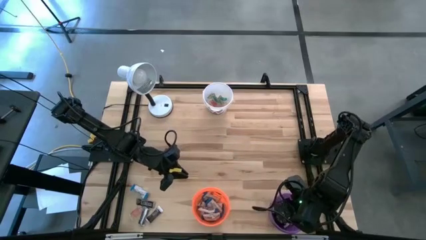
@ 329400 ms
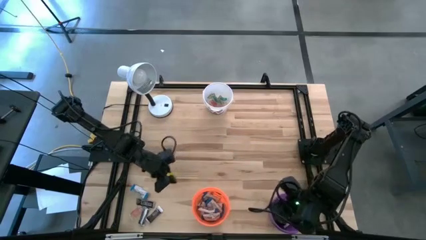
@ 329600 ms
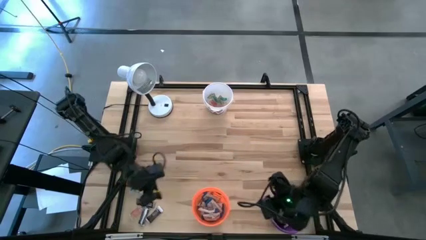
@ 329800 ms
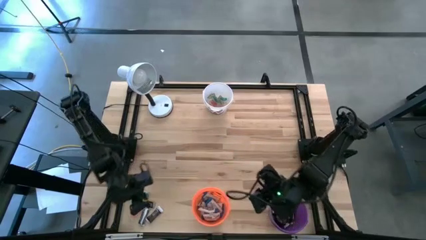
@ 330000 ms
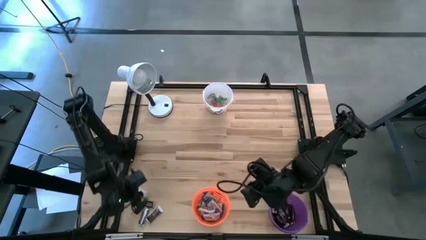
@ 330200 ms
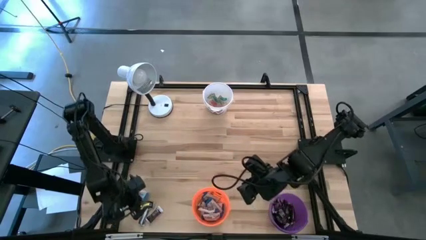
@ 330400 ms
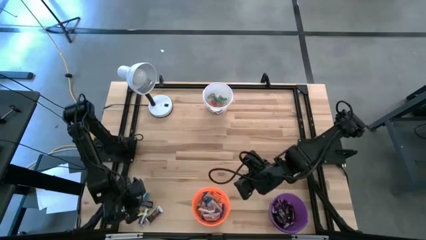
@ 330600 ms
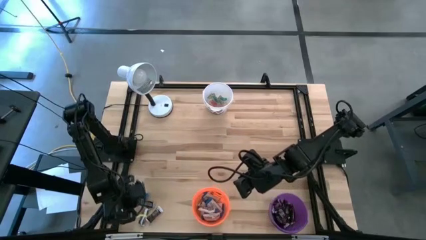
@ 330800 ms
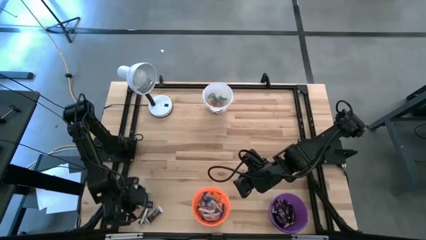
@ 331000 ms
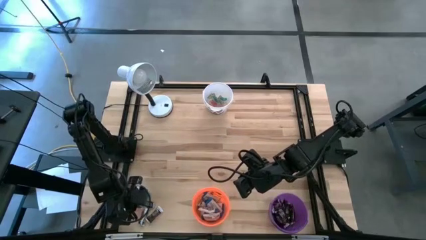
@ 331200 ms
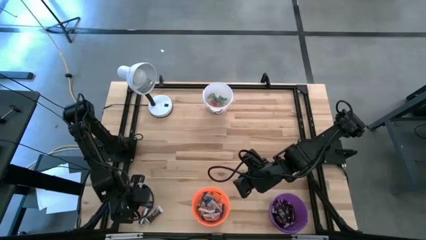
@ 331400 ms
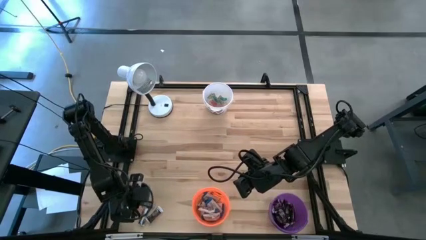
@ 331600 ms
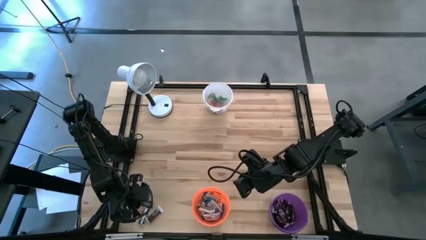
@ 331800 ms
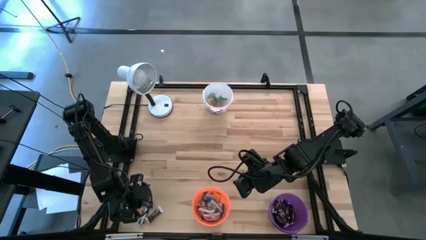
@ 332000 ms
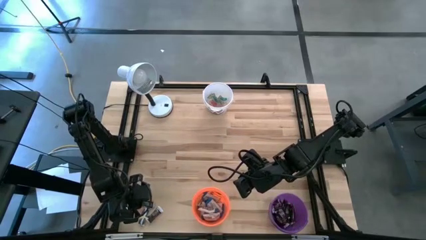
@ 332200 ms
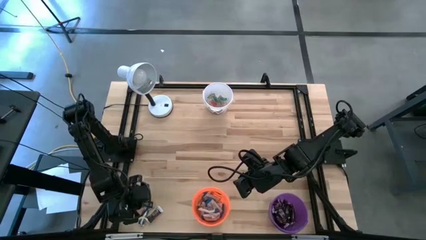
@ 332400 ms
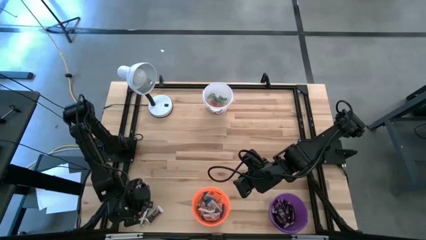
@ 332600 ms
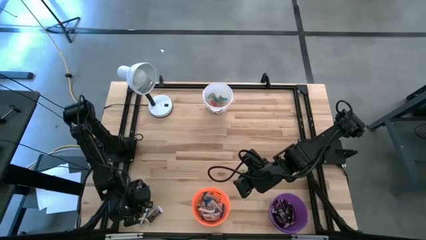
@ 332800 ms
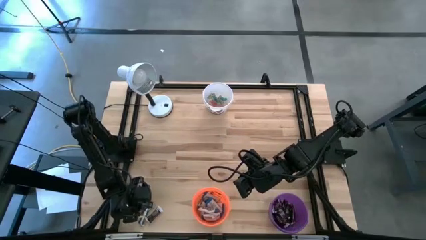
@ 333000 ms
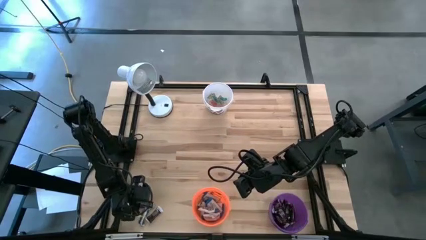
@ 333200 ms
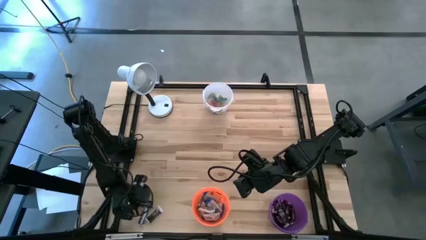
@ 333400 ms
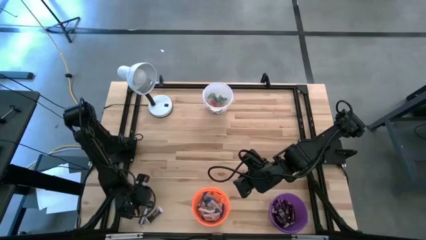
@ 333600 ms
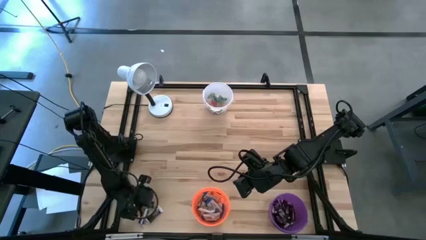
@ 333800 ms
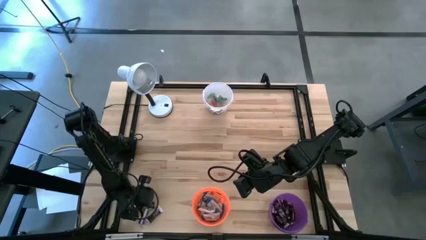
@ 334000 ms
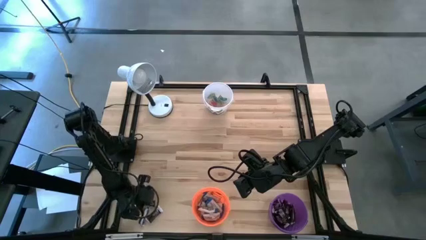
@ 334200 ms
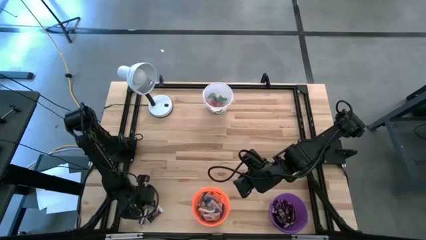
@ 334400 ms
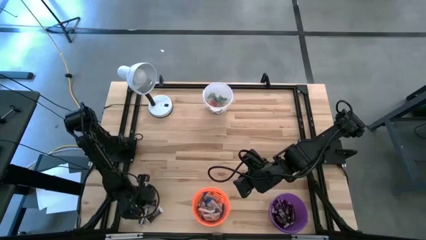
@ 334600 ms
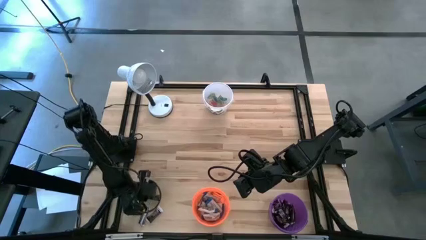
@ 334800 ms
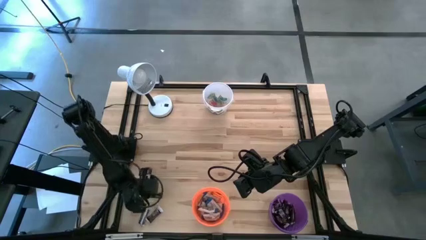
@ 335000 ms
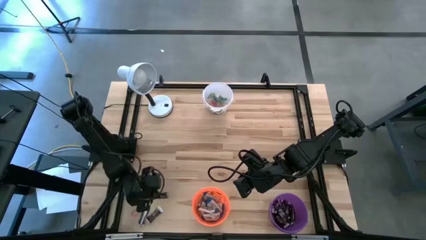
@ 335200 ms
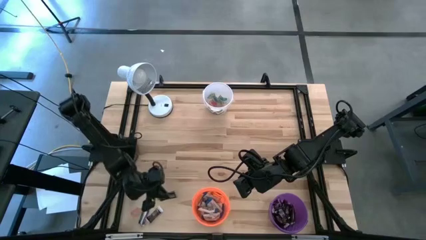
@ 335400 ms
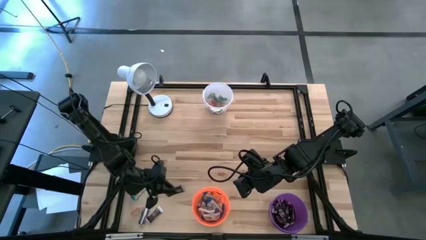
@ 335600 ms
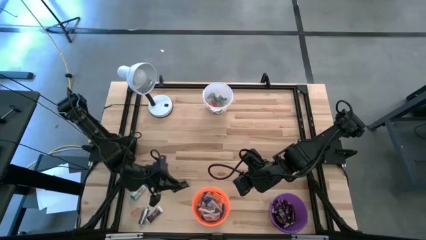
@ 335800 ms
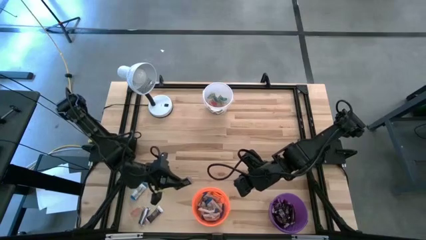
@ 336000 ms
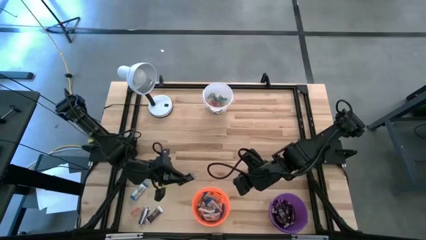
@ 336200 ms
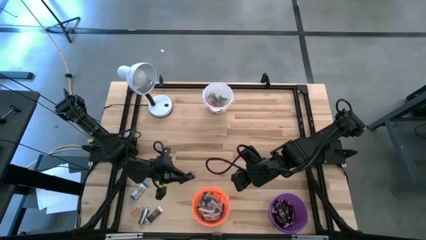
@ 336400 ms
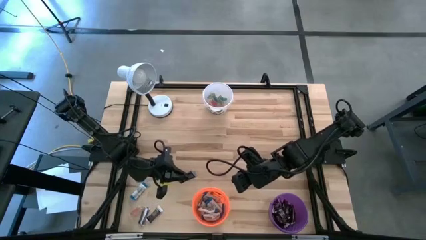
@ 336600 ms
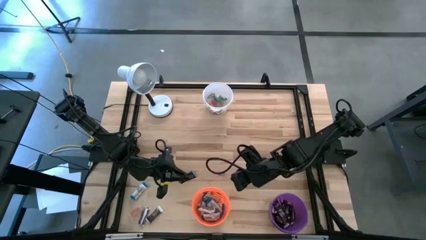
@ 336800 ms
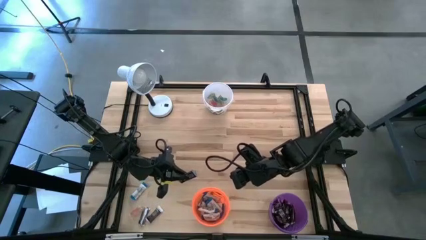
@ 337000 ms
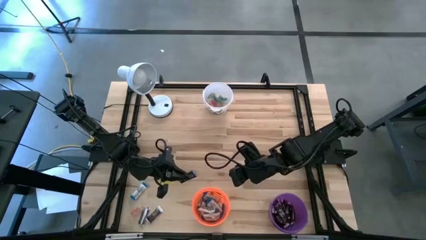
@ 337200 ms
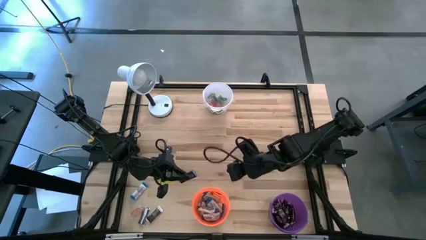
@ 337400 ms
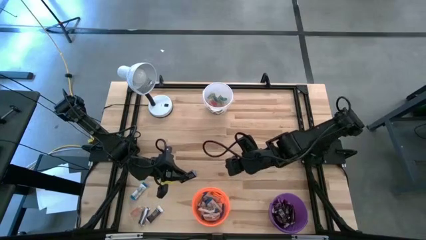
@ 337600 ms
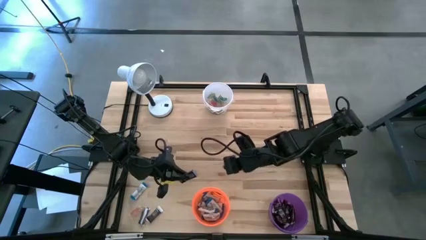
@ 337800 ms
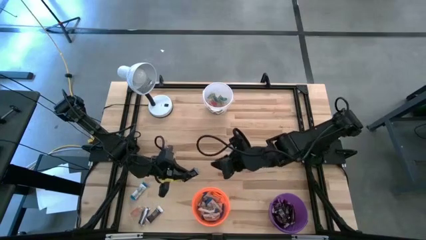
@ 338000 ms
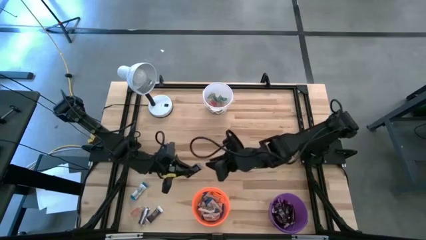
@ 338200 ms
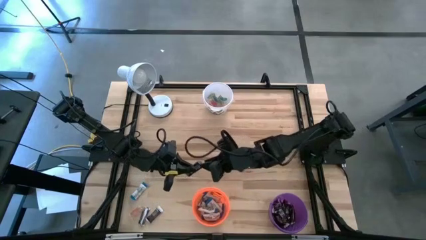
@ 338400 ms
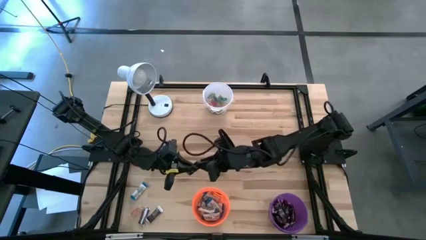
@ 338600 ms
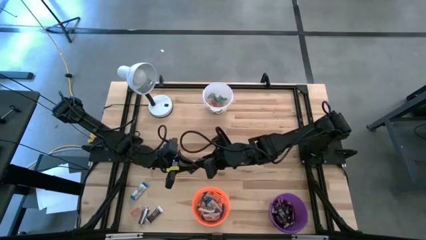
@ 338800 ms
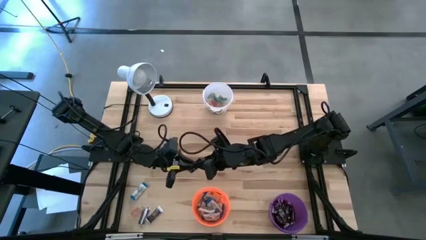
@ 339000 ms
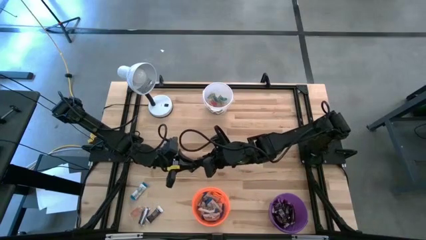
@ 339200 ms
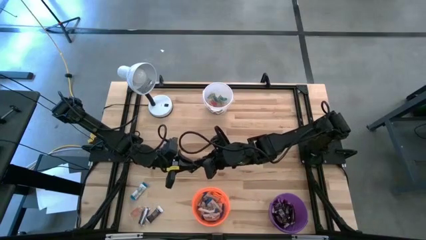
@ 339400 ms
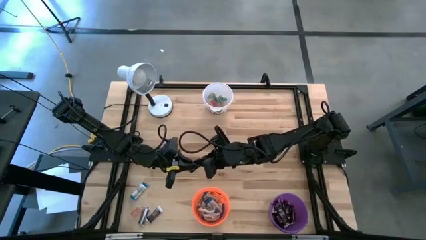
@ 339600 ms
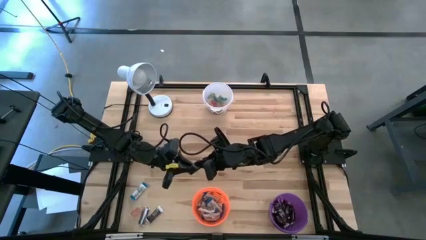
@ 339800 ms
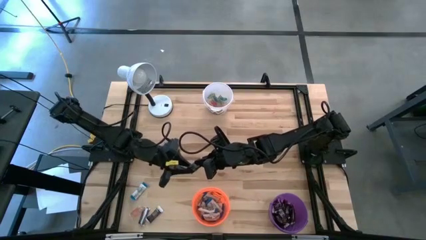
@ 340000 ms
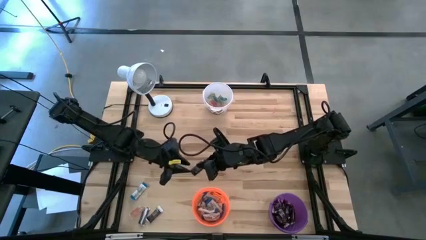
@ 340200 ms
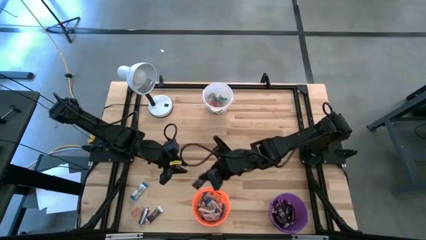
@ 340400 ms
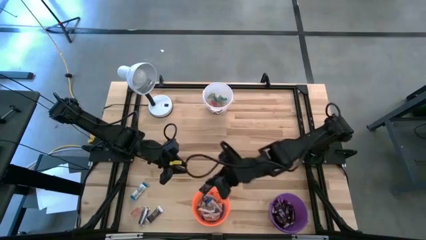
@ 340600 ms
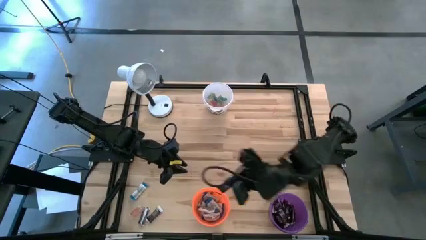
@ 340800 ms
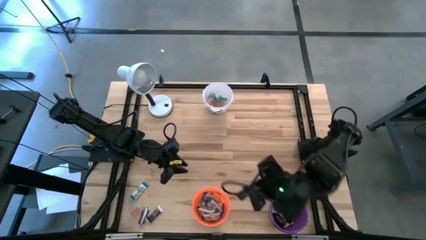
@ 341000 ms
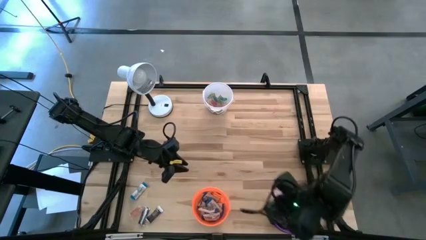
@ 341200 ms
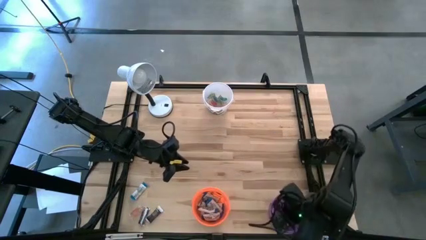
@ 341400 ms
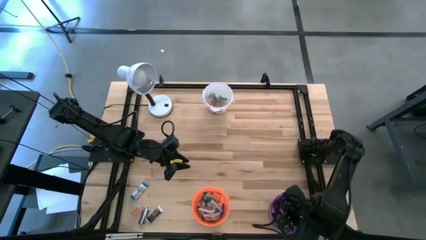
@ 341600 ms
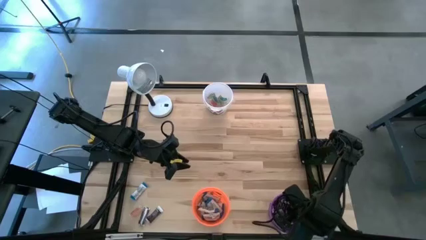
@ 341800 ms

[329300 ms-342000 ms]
Task: Organize candy in baskets
Put the dark brown chocolate bar into the dark purple bucket

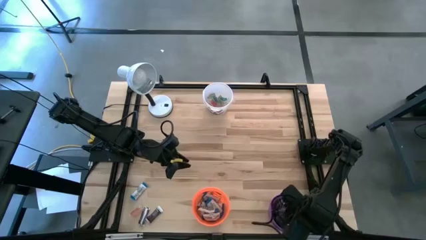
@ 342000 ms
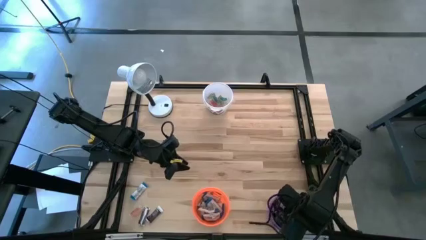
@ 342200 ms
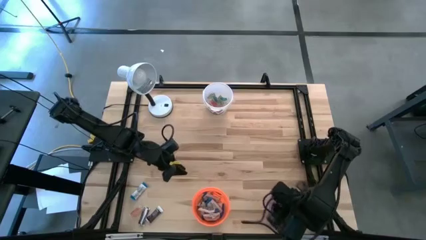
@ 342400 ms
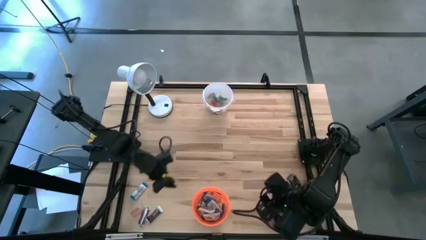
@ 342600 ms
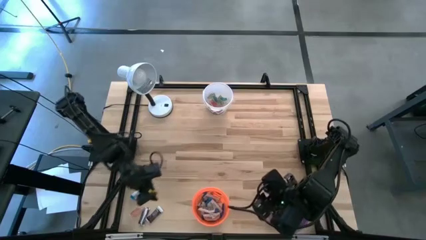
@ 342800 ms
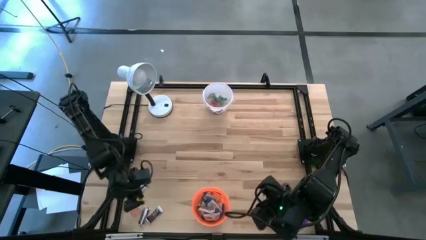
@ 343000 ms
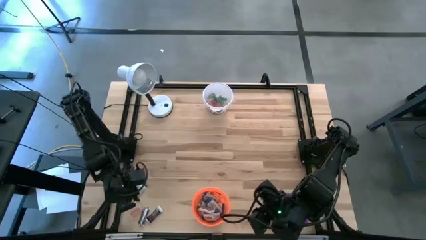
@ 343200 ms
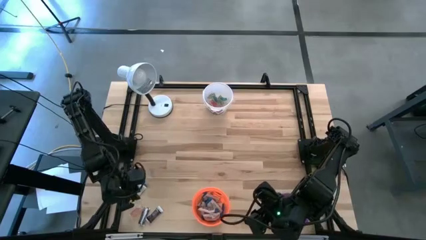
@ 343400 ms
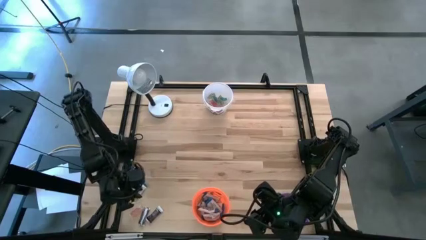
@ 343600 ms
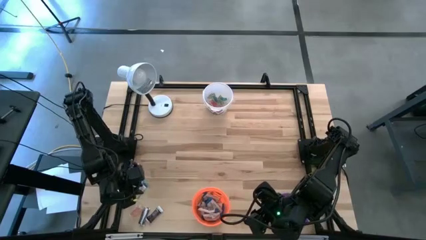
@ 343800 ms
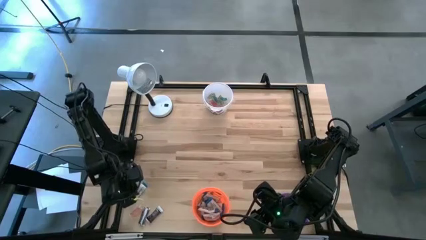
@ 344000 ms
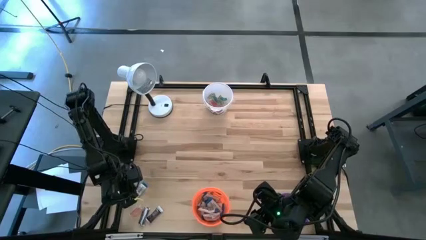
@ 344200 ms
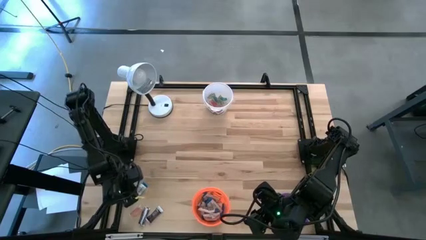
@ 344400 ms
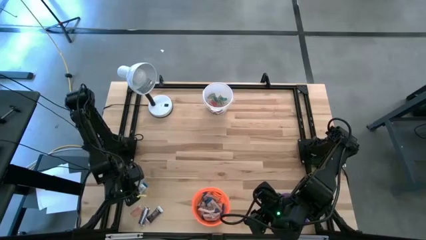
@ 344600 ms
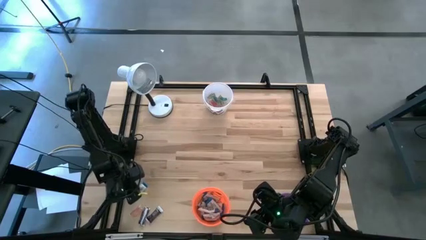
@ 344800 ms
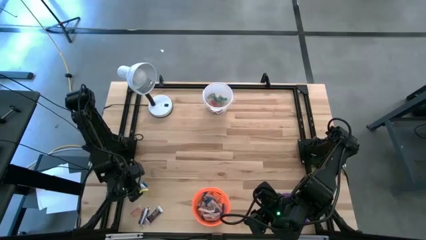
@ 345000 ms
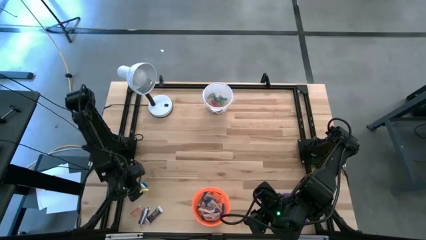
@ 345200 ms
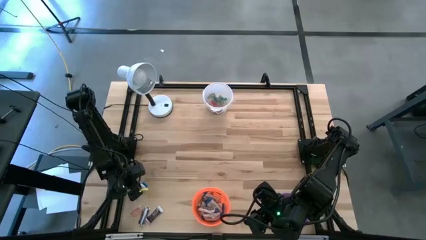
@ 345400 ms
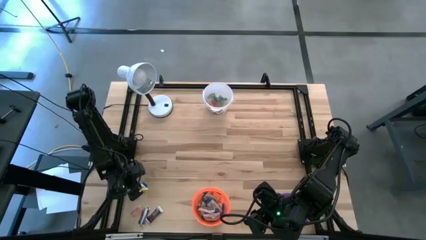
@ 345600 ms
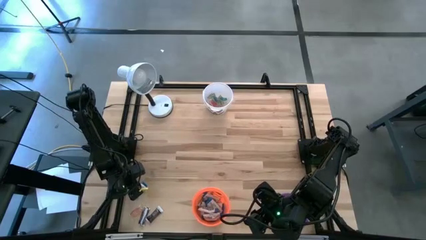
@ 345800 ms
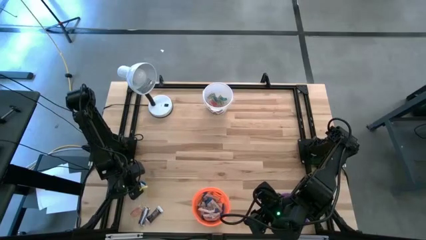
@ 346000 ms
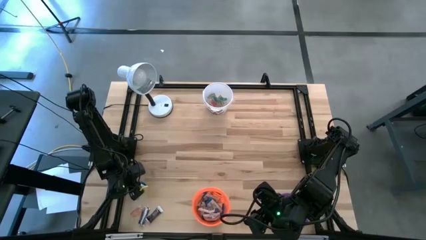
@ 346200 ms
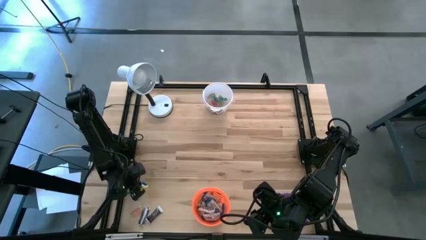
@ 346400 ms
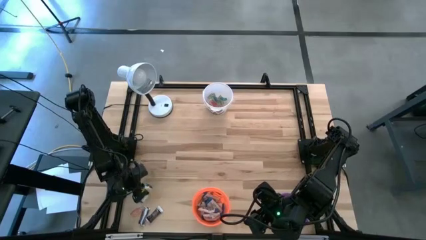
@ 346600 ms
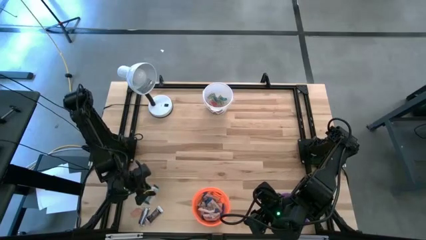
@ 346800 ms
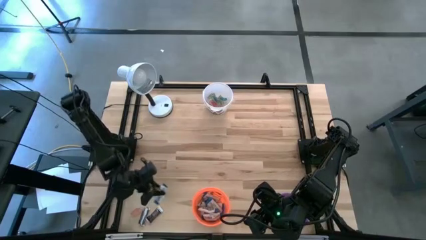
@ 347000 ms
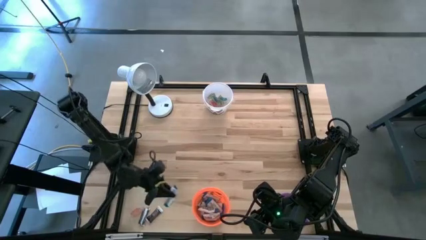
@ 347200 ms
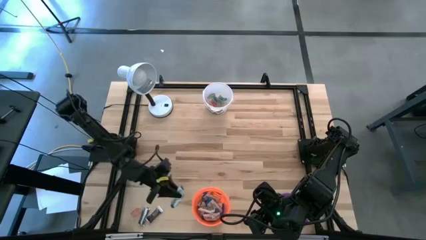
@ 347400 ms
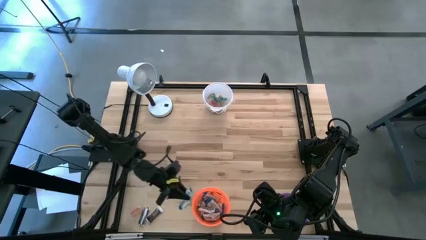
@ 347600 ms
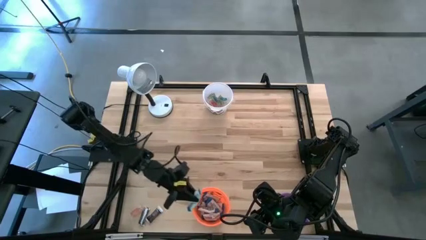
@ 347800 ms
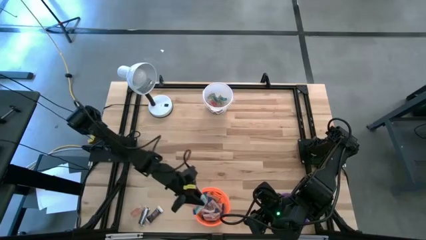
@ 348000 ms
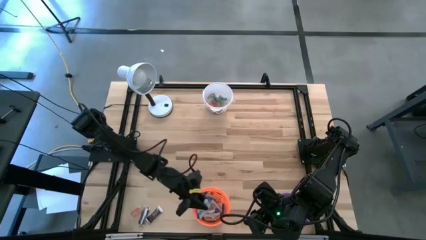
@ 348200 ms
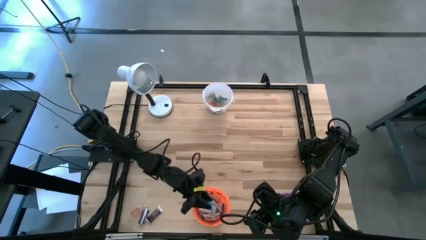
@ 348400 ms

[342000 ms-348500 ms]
Put the white chocolate bar into the orange bucket
